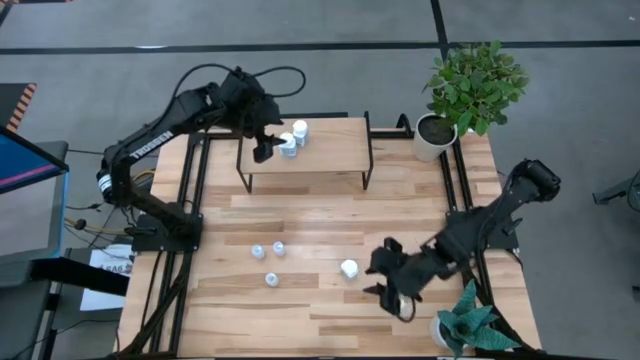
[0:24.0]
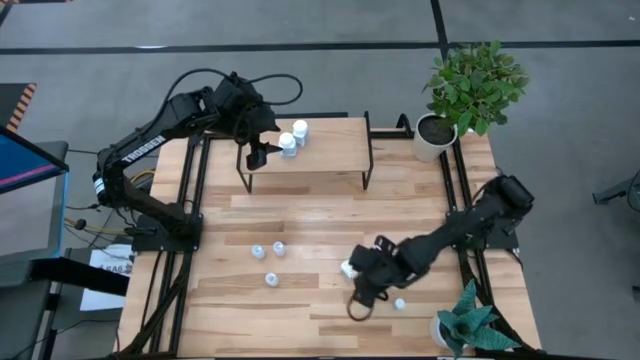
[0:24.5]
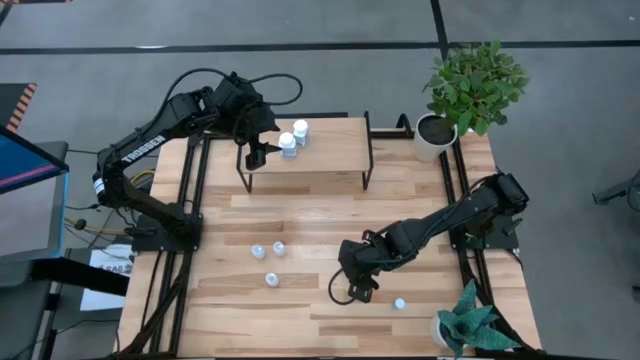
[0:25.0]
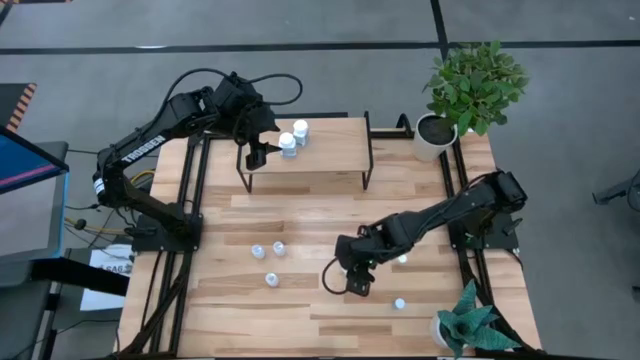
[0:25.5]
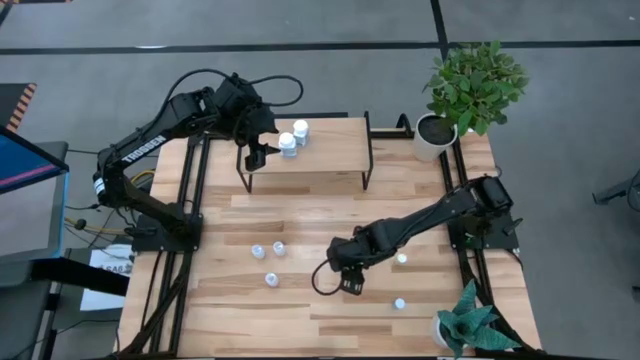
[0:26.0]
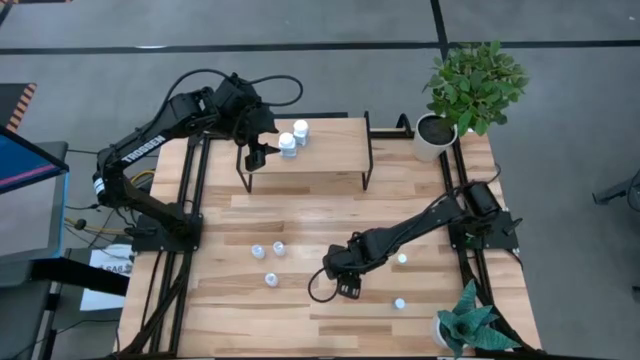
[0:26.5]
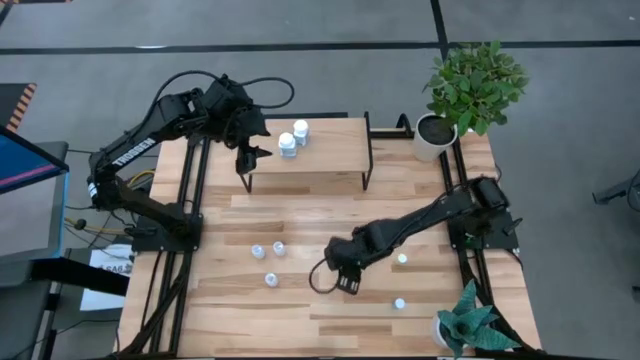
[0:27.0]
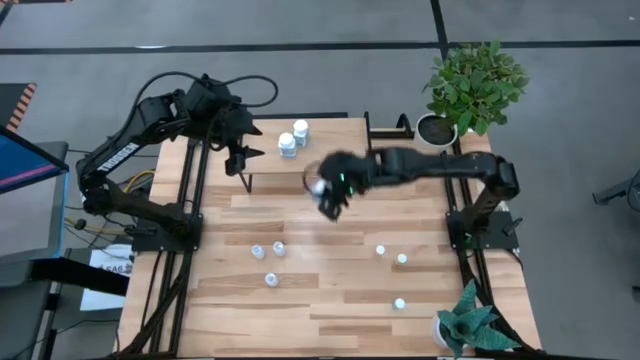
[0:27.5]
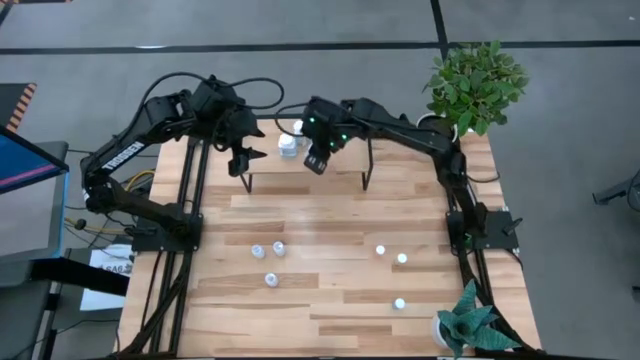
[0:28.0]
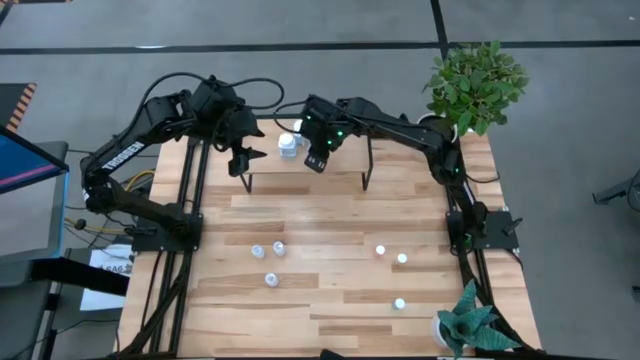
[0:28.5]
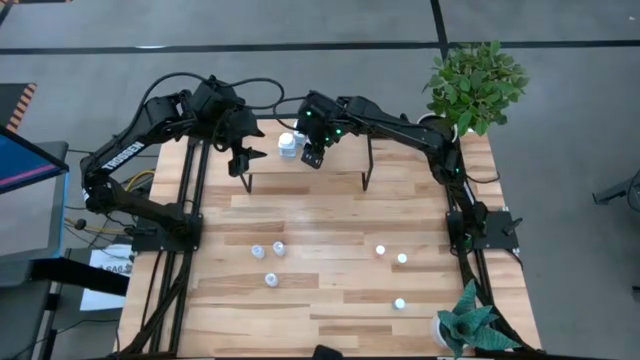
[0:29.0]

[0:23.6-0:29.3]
Task: Pick and place medicine bottles onto shelf by color
Put the white pill bottle on the shelf

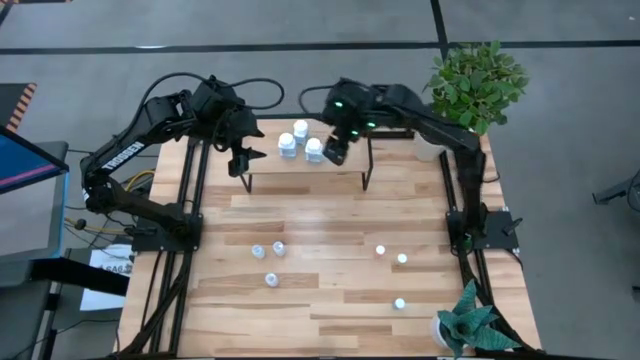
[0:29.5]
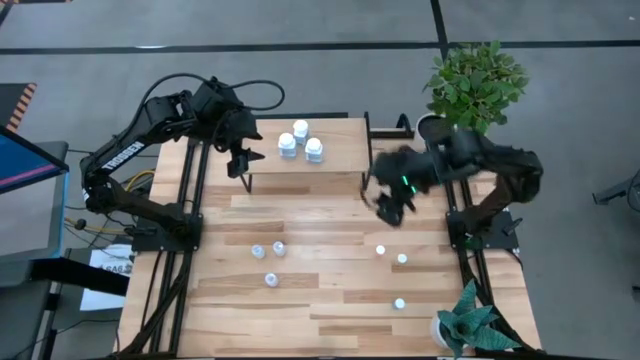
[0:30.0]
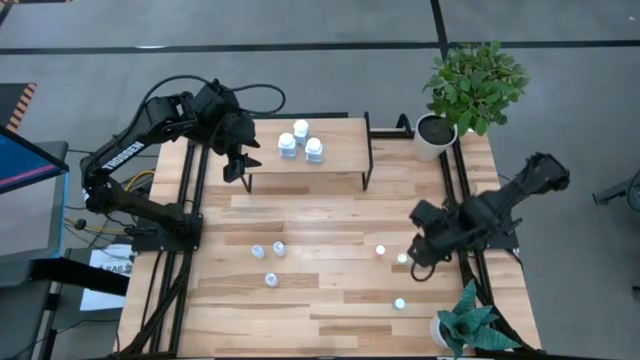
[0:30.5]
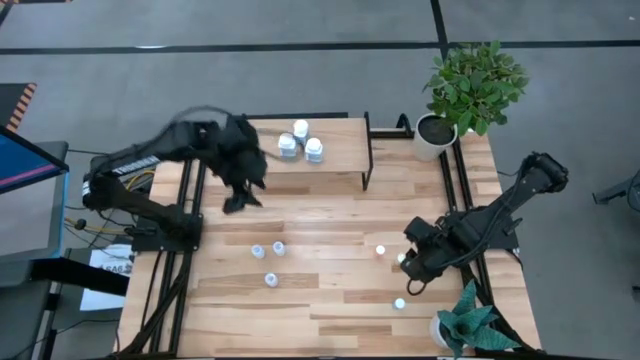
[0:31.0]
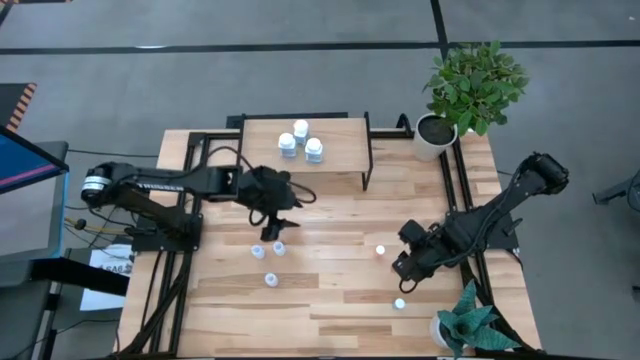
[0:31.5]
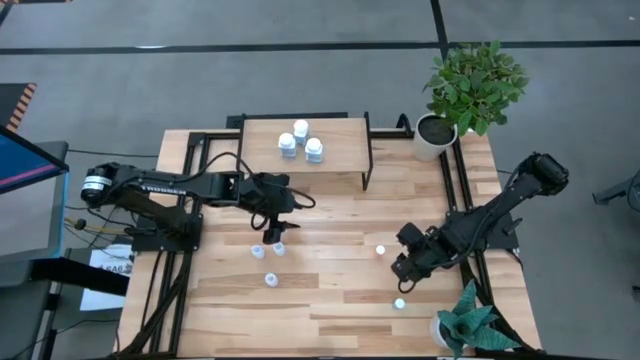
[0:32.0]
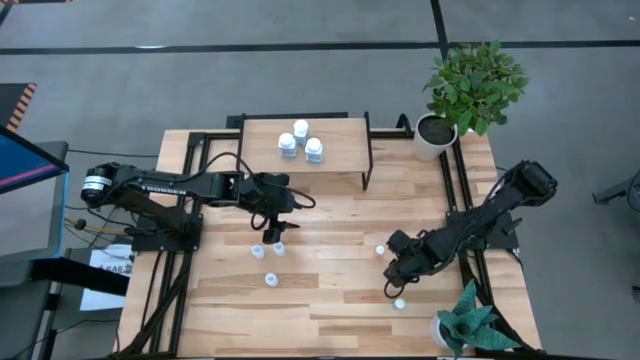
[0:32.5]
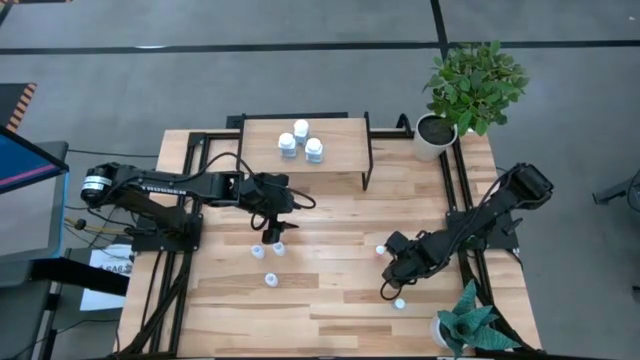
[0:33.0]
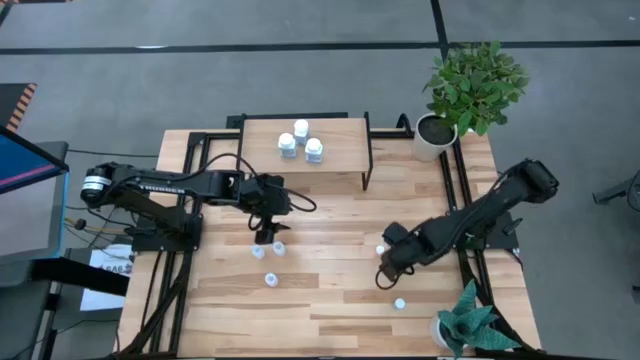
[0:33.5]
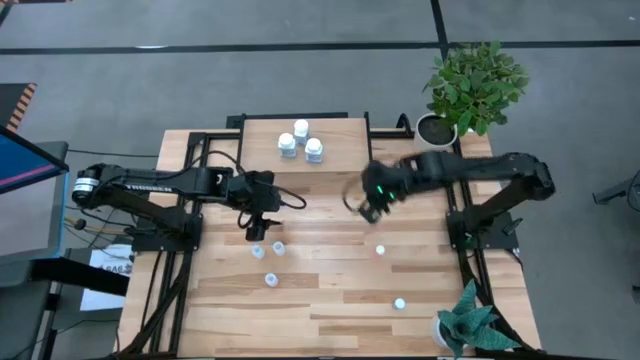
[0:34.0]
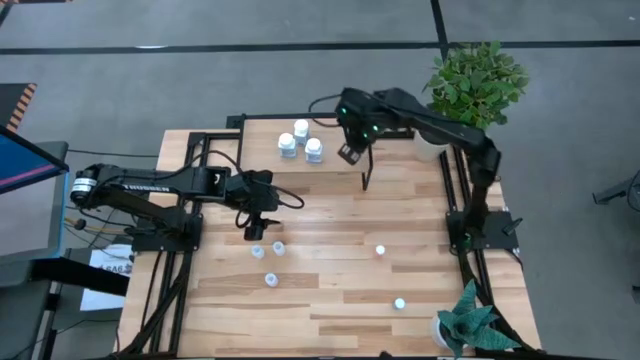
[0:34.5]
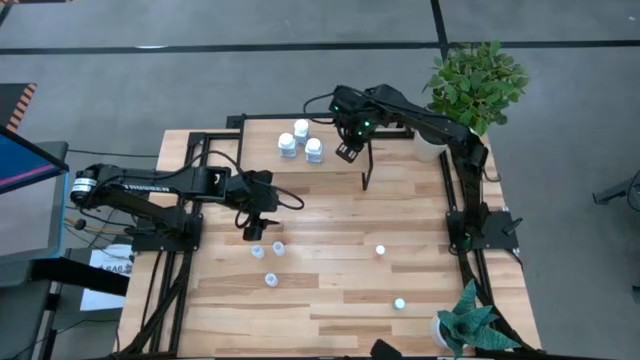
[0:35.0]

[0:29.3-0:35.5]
Put the yellow pill bottle on the shelf

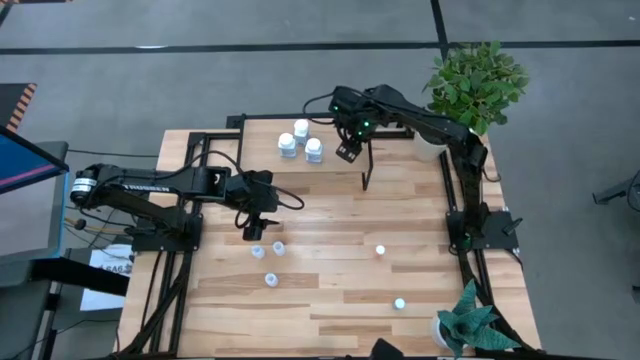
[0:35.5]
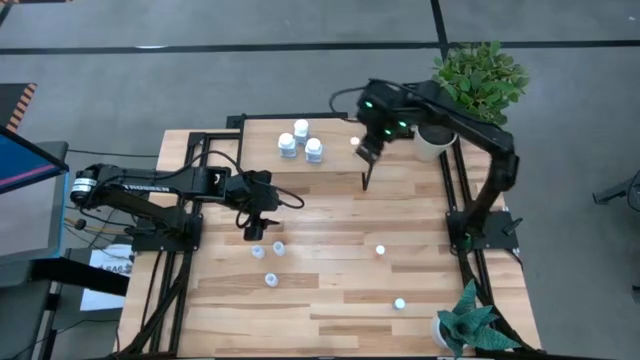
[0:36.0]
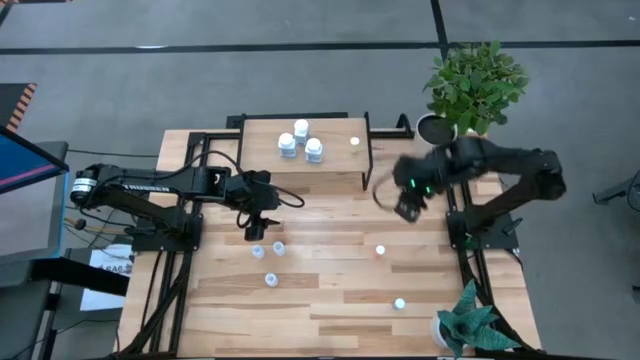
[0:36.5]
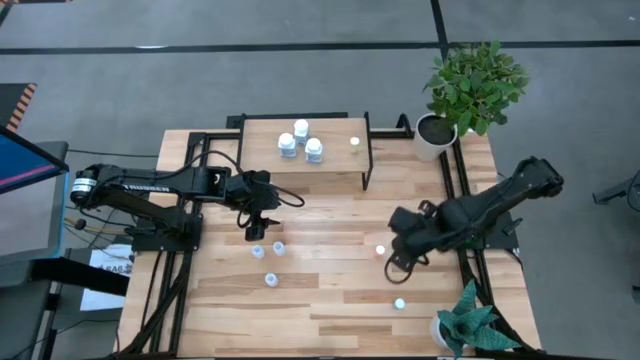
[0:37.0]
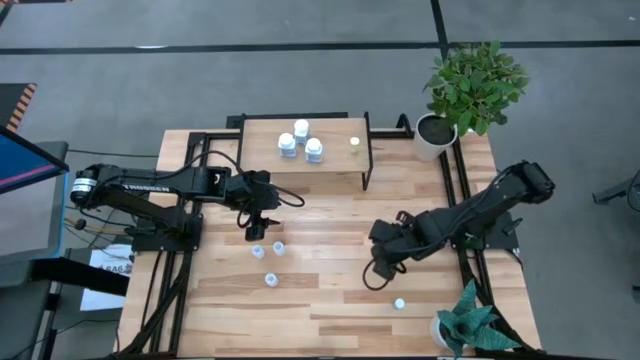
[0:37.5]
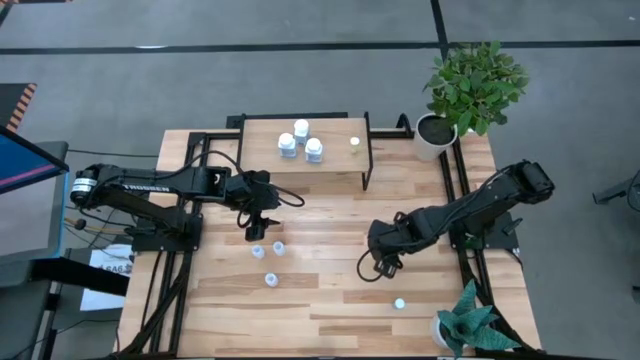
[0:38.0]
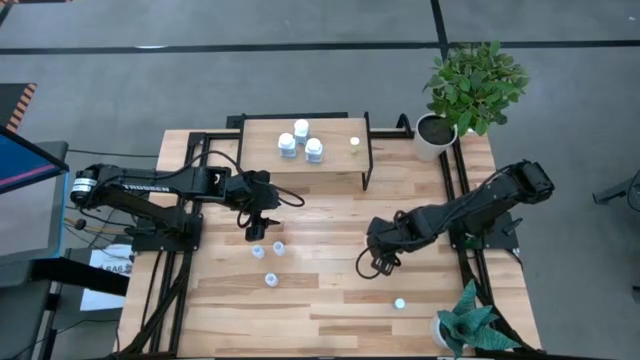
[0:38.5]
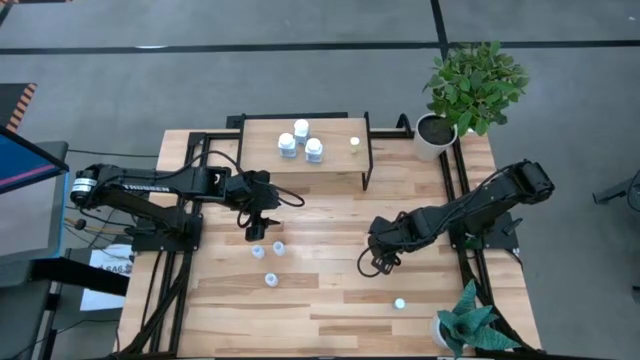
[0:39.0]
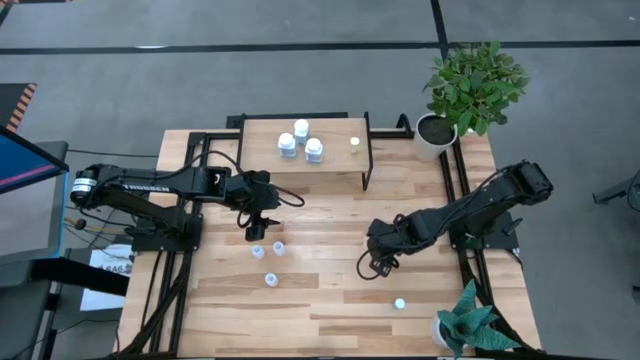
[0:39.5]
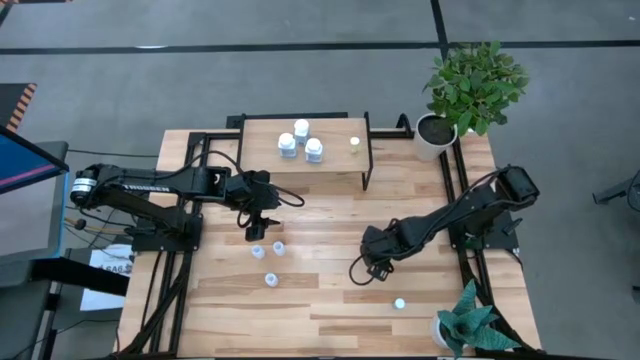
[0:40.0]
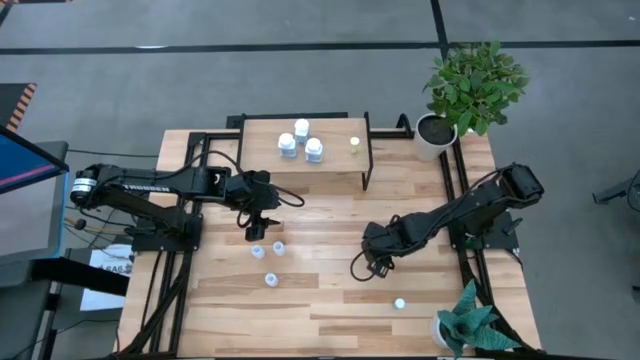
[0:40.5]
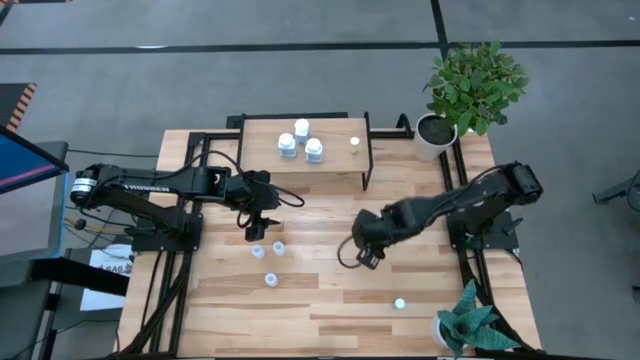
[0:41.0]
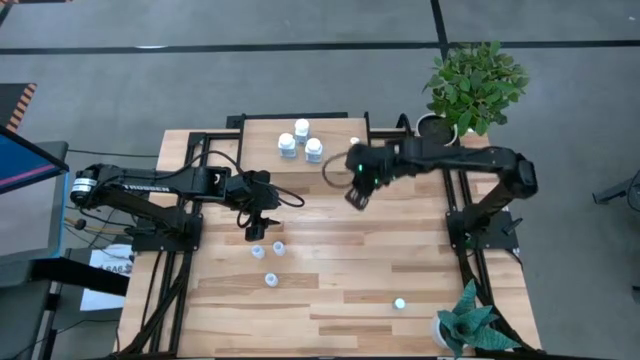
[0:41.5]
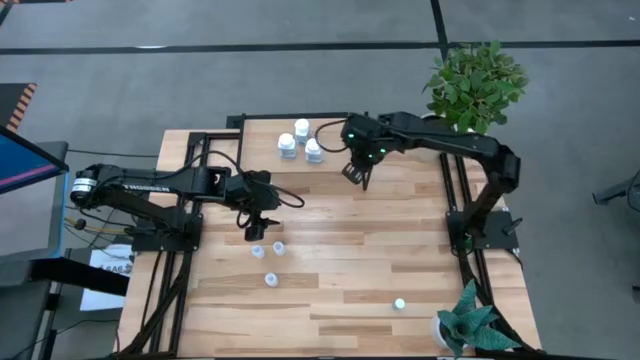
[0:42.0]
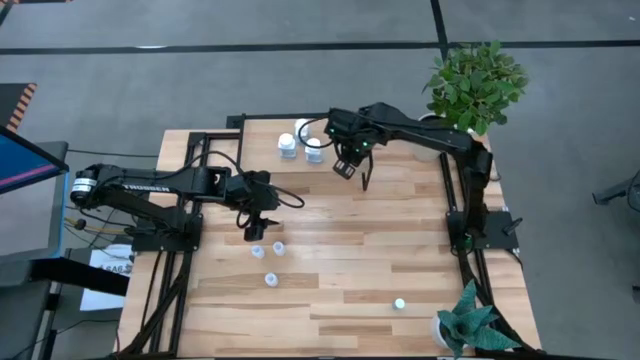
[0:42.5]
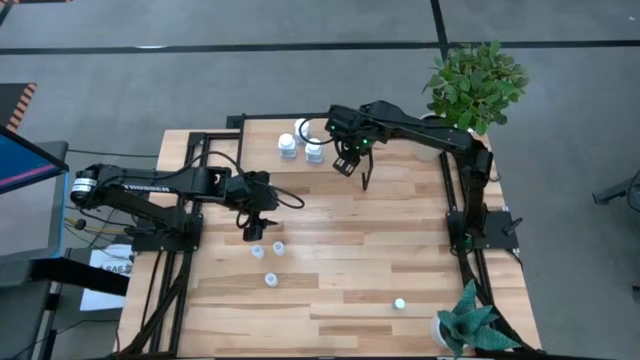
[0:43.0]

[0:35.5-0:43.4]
Put the pink pill bottle on the shelf

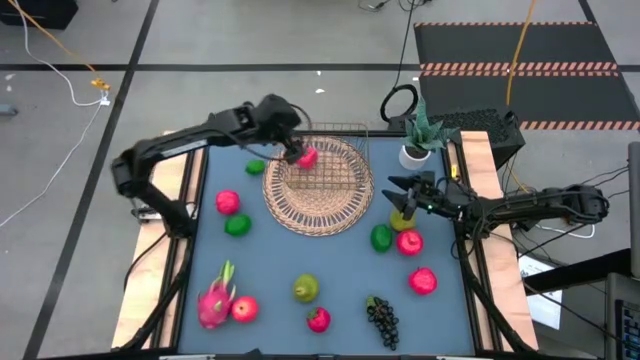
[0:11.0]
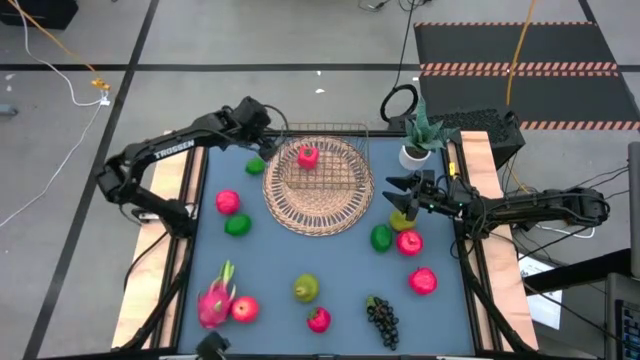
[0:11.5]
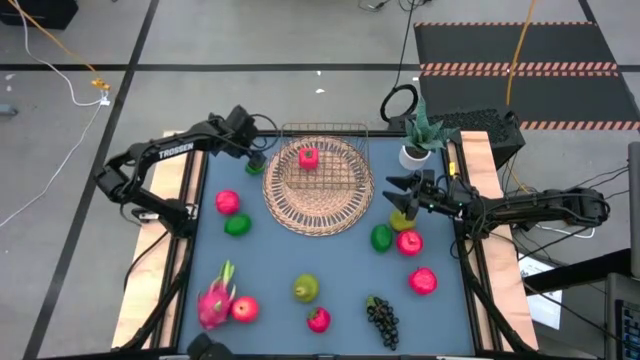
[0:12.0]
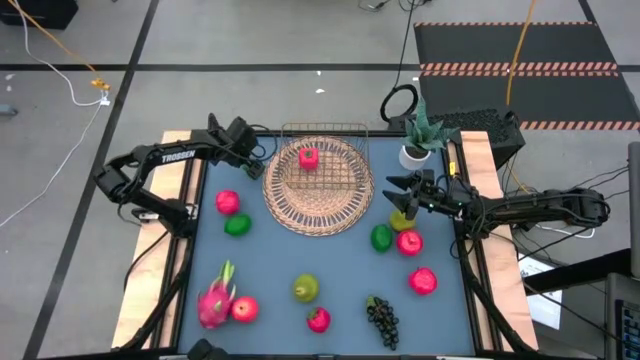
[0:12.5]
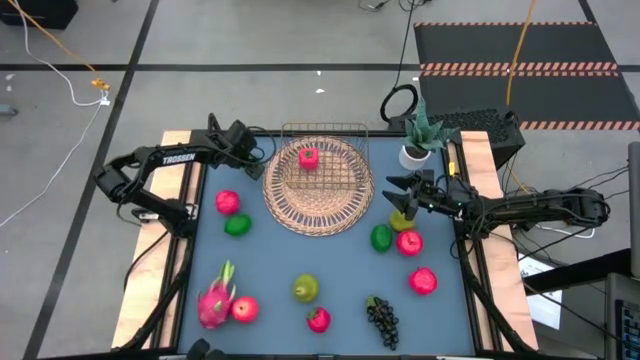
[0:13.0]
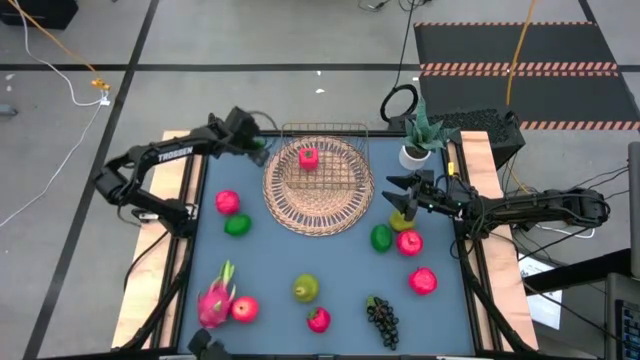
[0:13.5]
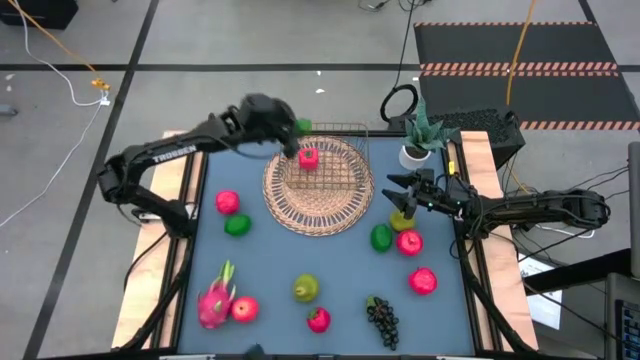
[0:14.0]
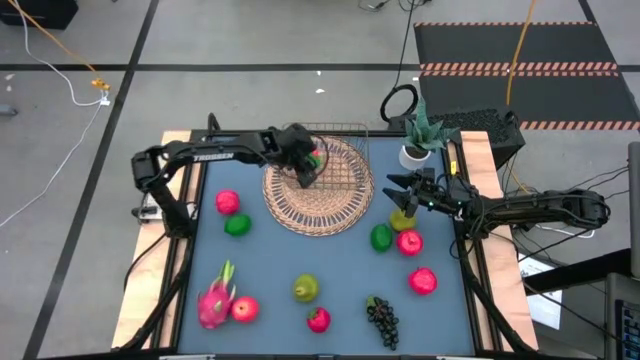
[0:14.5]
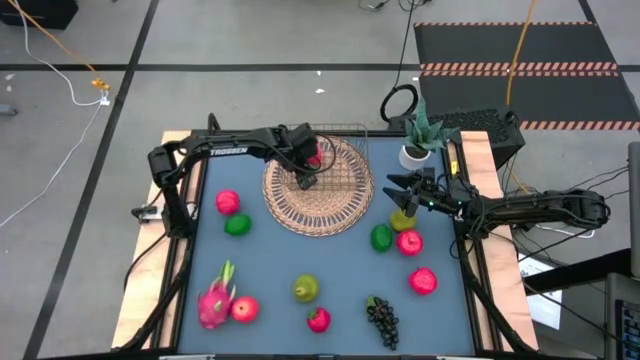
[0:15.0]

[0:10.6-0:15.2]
Task: Build produce basket
Put the green lime into the gold wire basket
